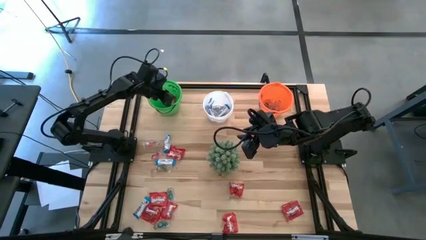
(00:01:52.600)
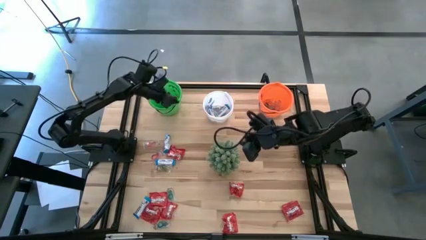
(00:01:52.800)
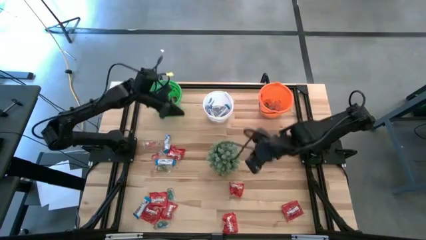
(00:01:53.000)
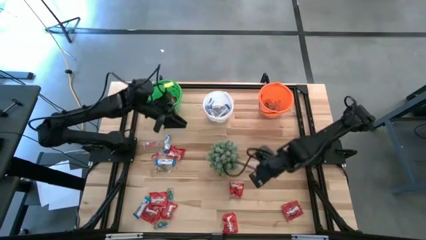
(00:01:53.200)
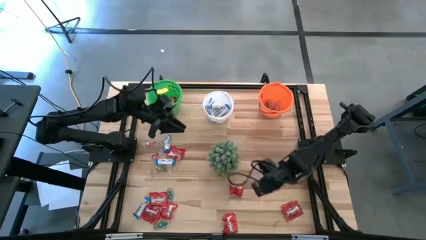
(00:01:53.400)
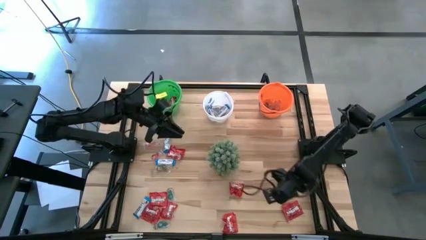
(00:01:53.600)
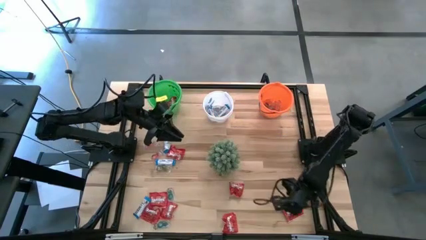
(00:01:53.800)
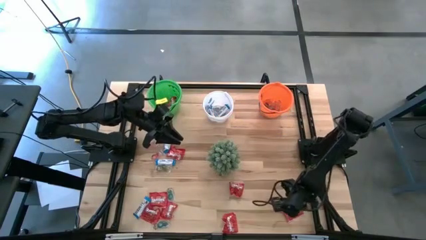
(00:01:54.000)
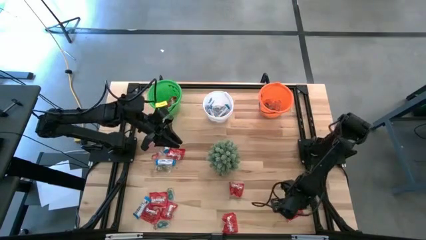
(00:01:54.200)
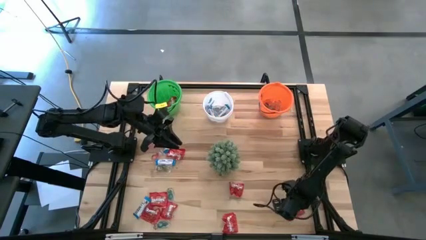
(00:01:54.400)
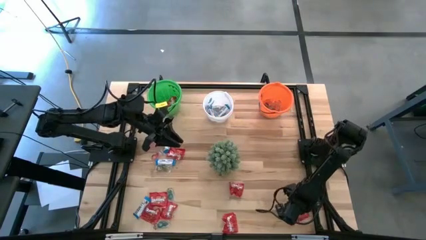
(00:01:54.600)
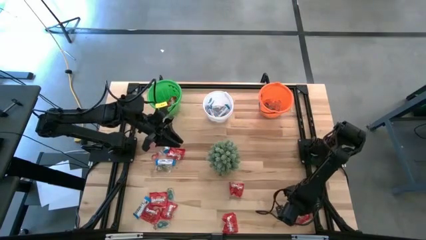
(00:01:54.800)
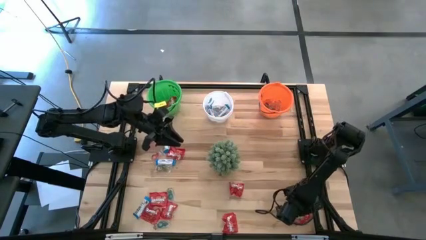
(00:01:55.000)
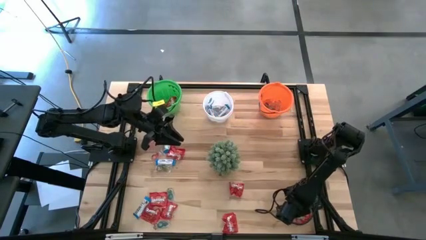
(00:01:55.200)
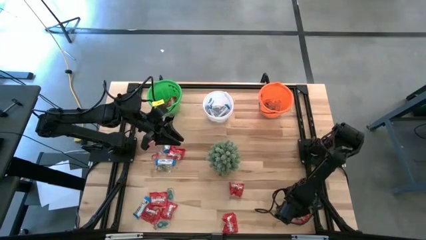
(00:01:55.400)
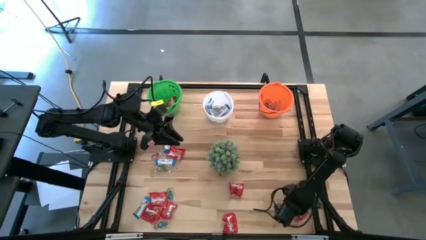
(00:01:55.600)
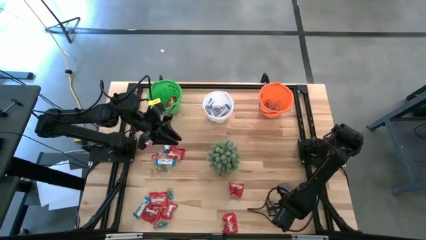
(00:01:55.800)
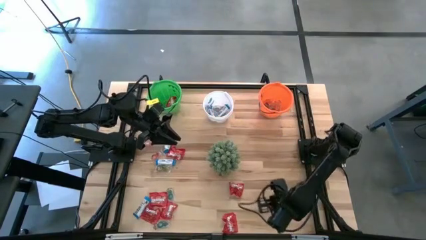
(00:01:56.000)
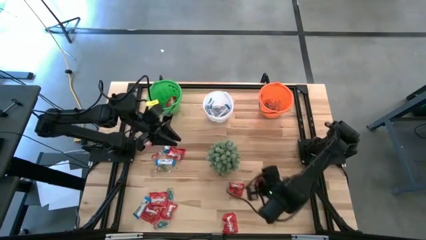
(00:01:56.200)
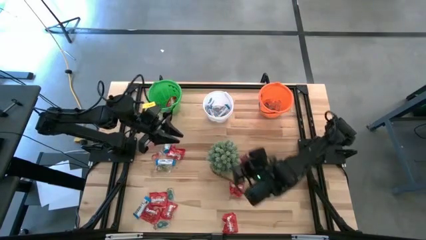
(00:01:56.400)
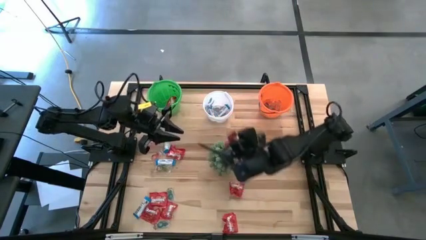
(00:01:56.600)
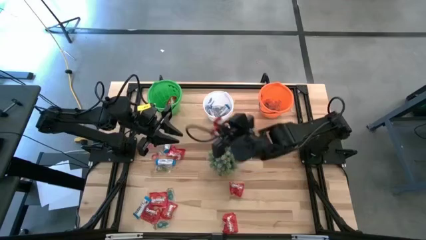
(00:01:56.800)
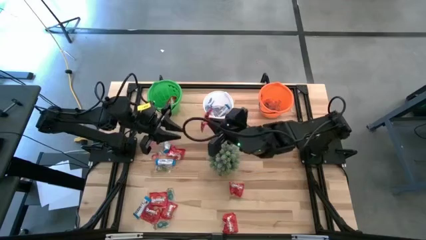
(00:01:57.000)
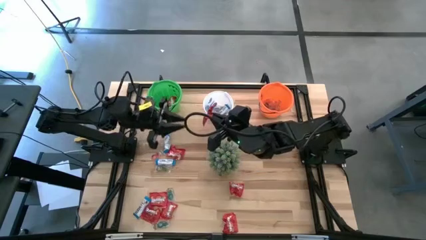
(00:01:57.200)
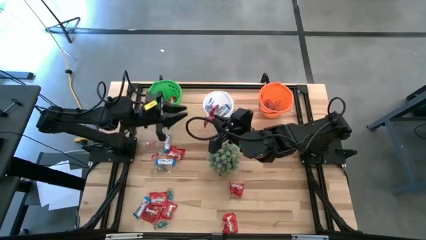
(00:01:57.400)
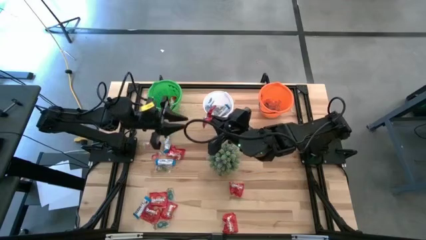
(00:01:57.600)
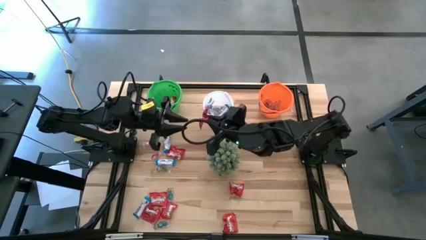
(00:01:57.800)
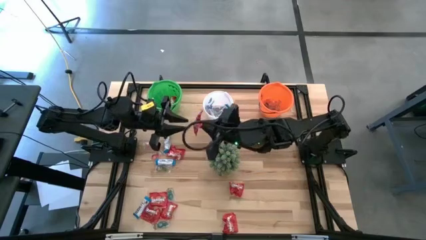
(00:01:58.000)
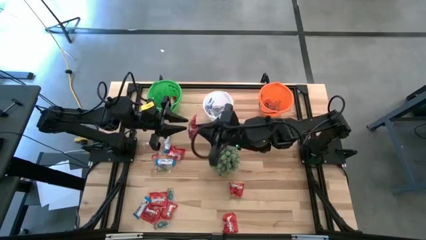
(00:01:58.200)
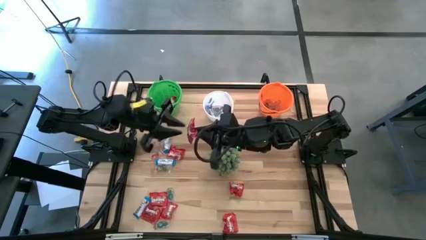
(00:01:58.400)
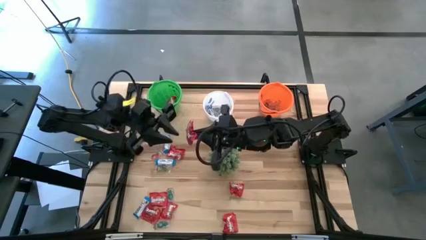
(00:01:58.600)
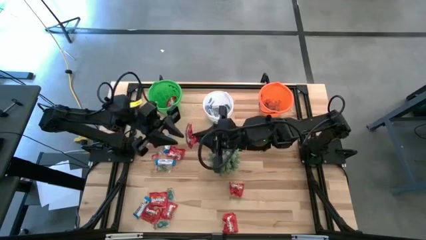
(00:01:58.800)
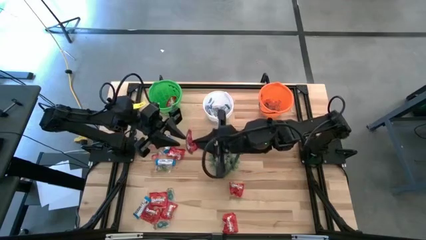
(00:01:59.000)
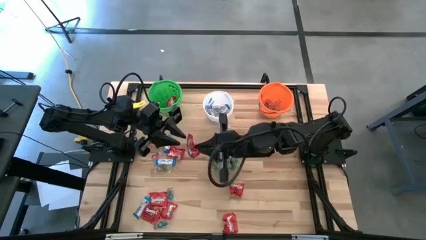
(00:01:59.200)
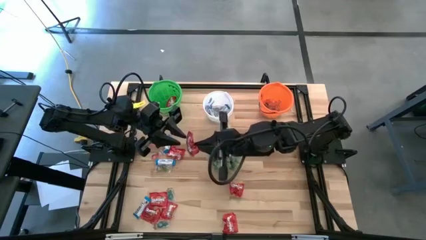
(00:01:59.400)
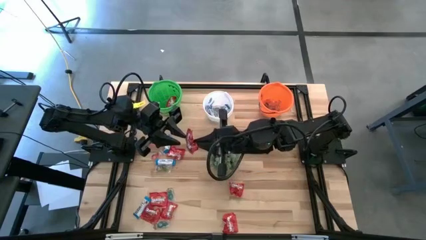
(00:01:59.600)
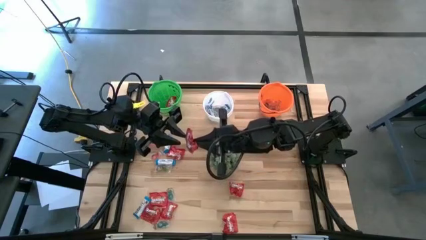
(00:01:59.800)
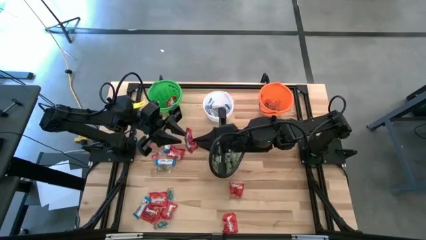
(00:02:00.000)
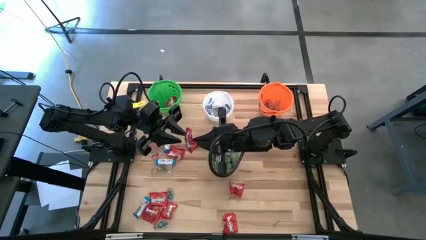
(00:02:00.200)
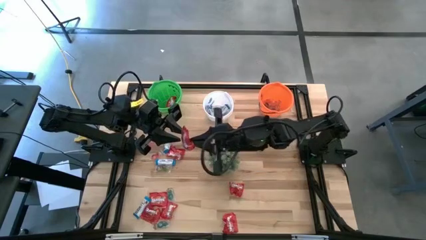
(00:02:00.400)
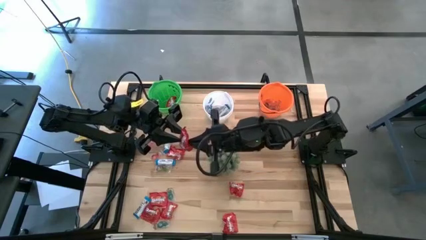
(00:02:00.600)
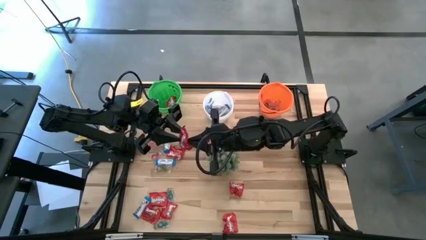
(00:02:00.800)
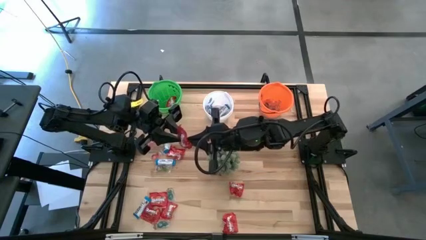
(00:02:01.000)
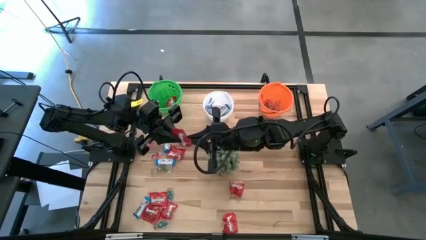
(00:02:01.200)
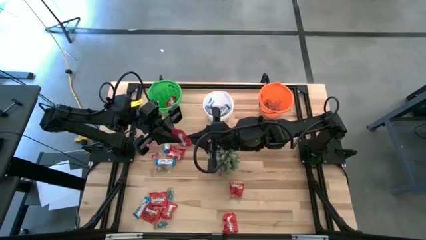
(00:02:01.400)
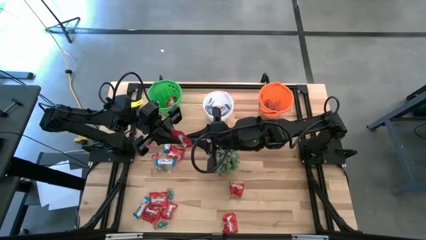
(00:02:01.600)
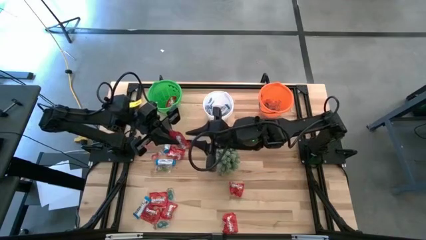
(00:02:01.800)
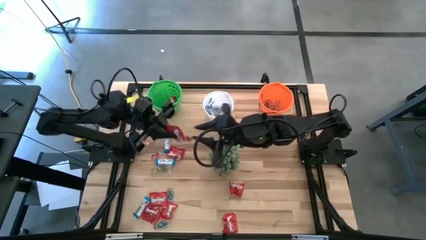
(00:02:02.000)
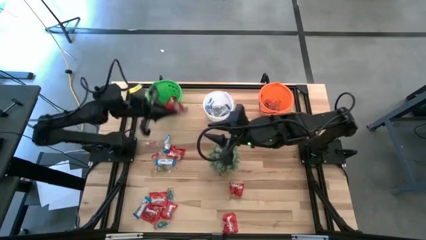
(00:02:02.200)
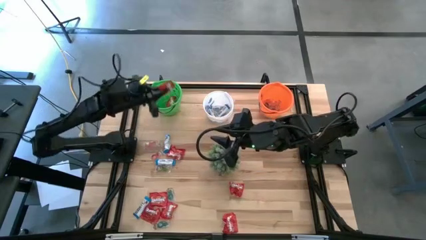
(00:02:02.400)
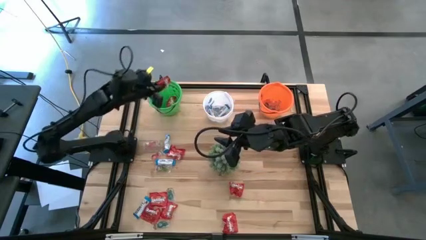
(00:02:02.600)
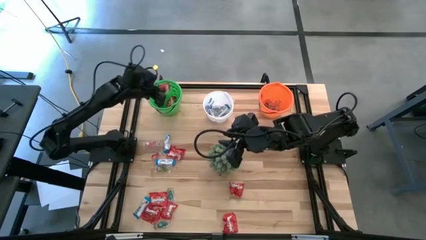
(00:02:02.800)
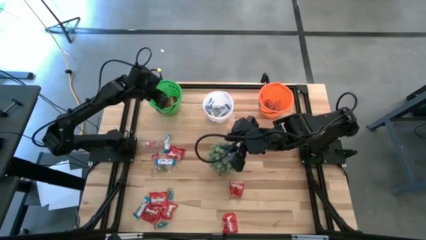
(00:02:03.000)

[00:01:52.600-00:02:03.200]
Task: Sort candy
Put the red candy into the green bucket

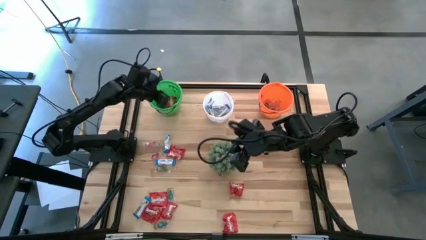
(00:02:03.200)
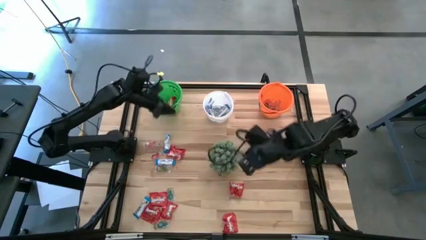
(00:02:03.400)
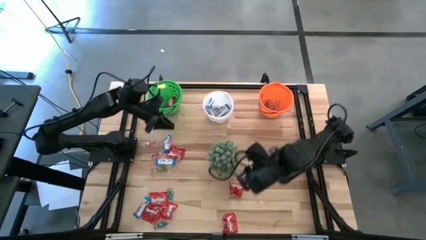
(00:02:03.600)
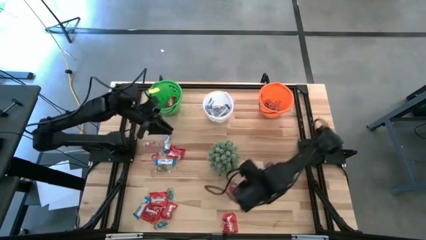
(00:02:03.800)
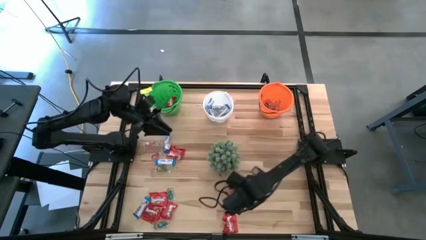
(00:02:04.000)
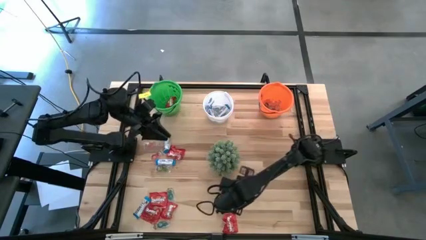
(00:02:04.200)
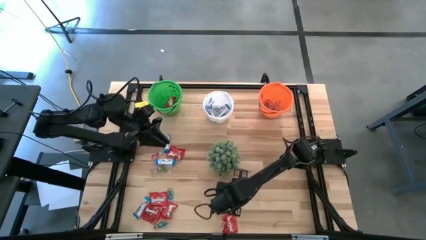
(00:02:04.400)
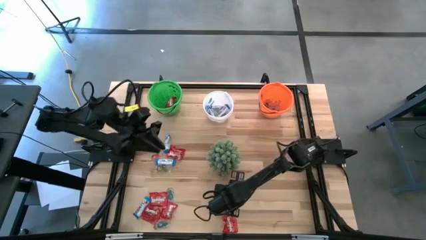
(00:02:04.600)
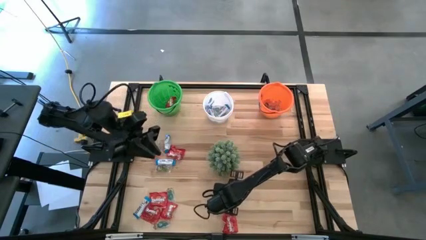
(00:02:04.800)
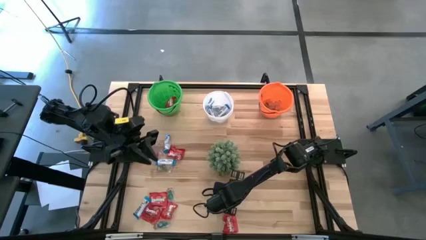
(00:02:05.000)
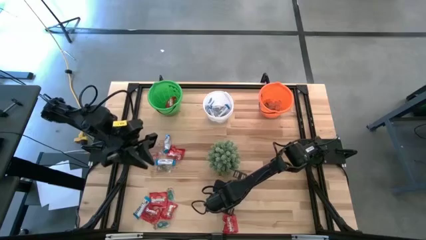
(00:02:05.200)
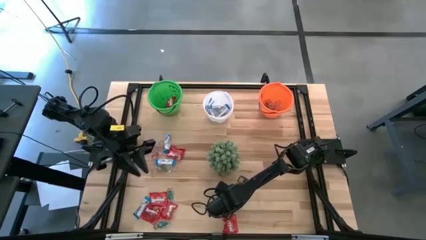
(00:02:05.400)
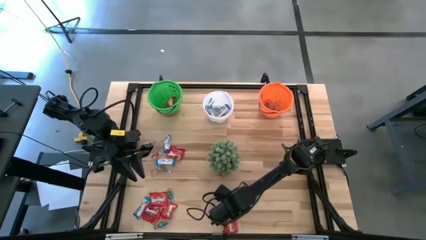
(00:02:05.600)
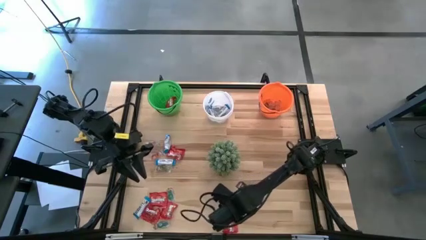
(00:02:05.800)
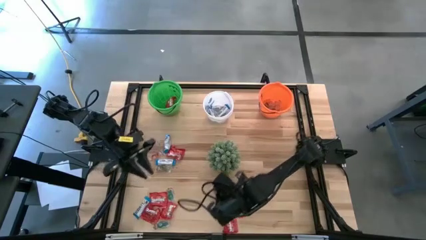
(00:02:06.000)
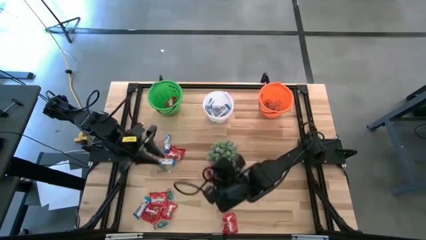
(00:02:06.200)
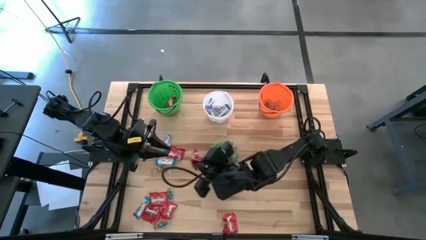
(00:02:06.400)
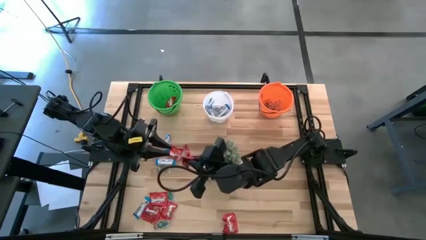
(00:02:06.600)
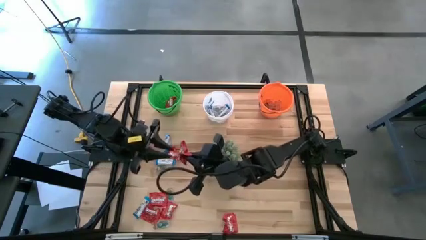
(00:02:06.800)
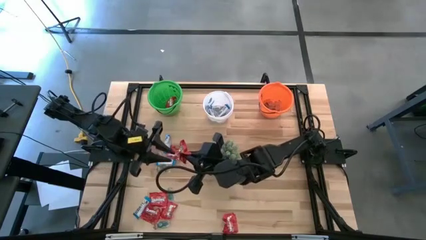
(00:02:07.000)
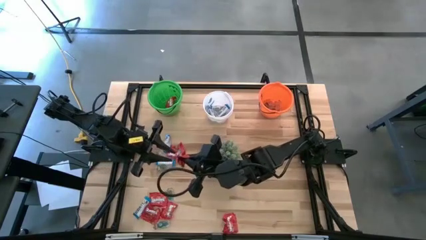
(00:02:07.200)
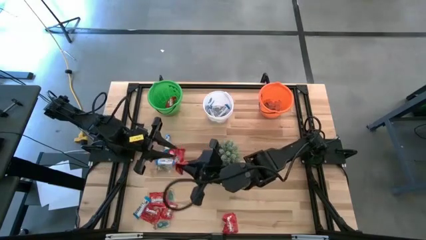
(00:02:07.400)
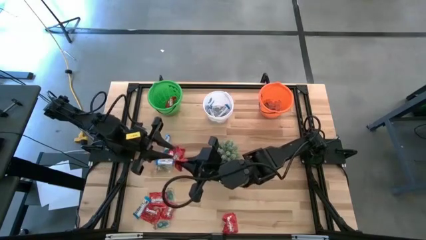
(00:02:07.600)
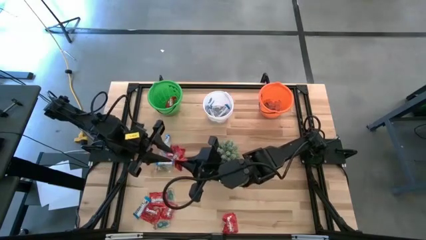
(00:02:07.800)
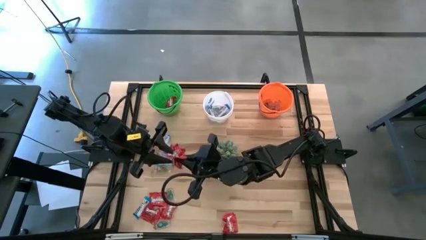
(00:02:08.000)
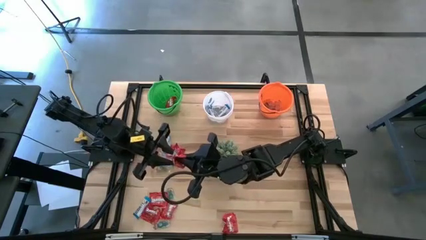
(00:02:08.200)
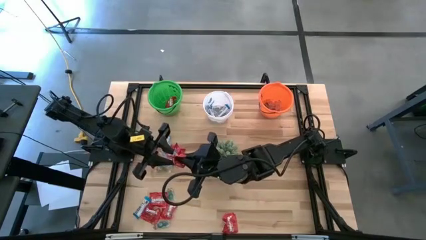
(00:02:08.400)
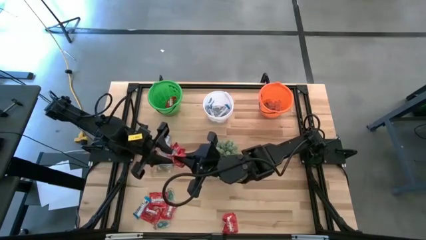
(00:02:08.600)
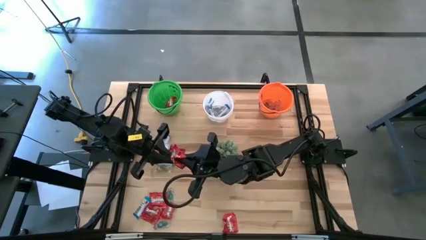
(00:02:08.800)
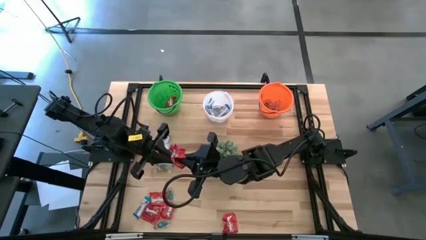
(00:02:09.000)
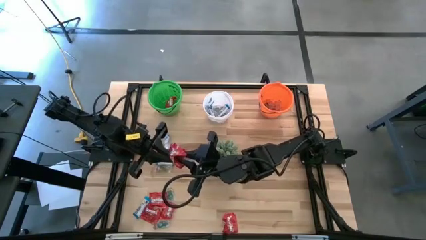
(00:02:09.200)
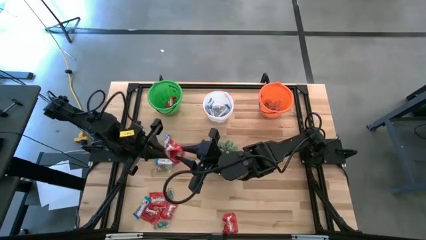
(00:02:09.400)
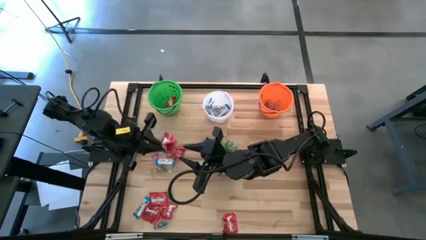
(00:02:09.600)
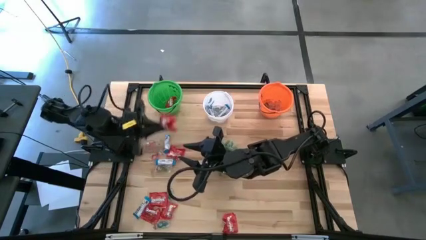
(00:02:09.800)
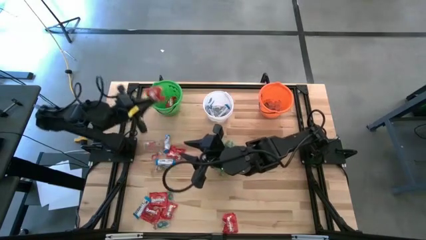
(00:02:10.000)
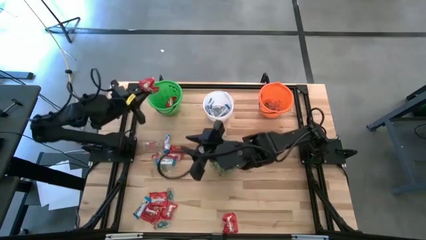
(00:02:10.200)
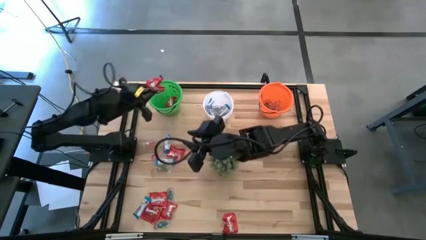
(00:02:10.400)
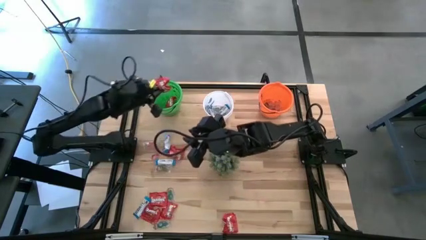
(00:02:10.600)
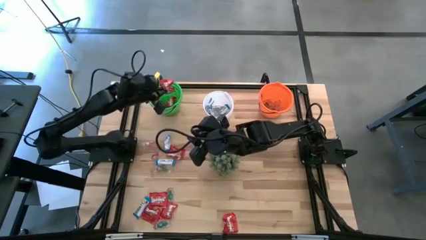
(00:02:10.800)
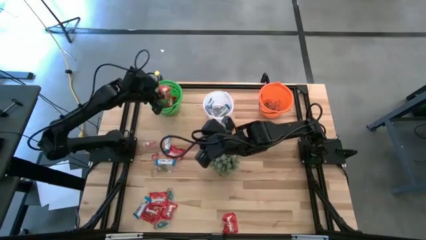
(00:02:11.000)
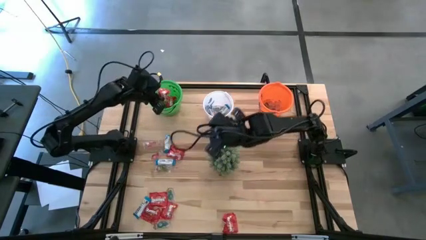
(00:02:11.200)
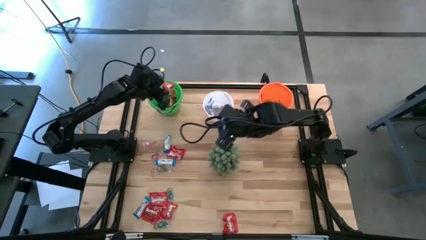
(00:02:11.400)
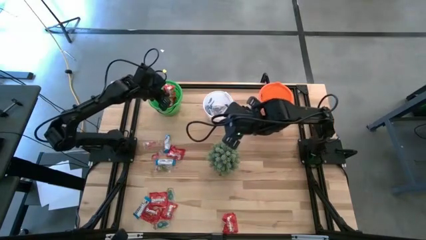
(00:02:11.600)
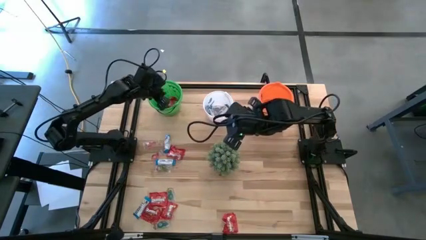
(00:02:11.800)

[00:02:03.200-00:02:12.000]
Put the red candy into the green bucket
